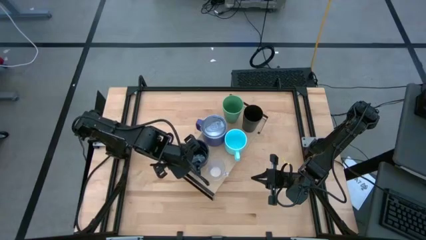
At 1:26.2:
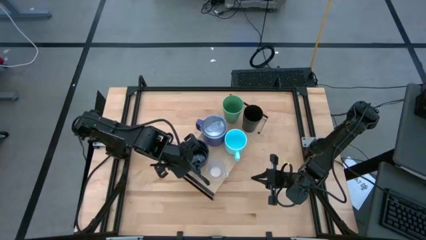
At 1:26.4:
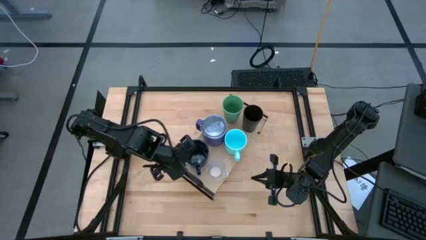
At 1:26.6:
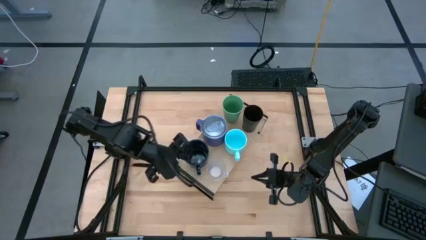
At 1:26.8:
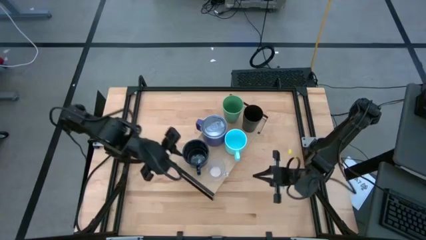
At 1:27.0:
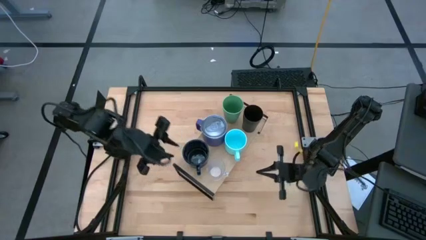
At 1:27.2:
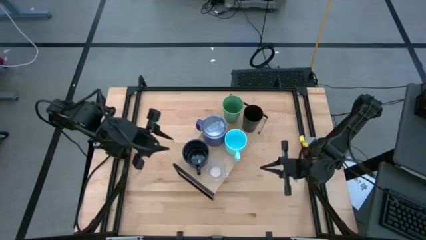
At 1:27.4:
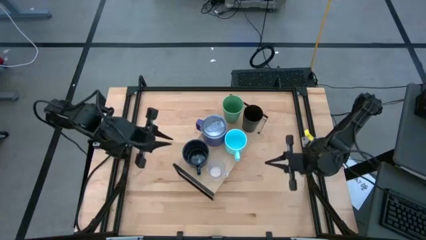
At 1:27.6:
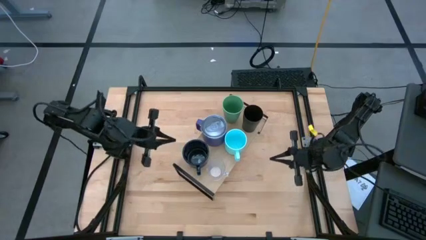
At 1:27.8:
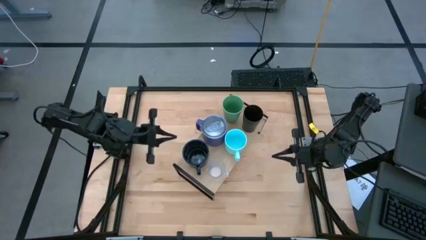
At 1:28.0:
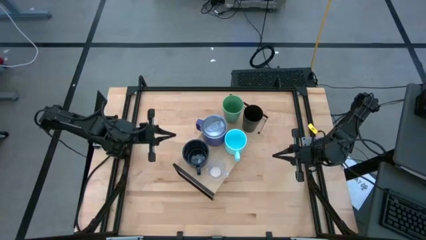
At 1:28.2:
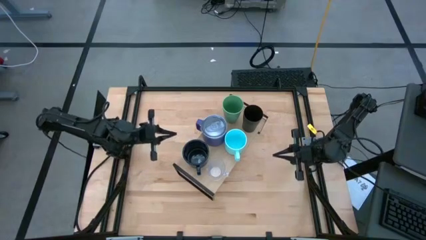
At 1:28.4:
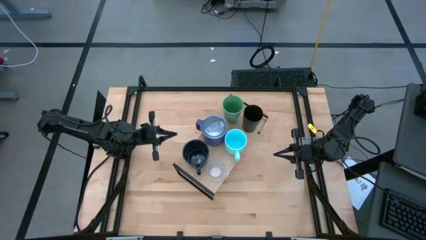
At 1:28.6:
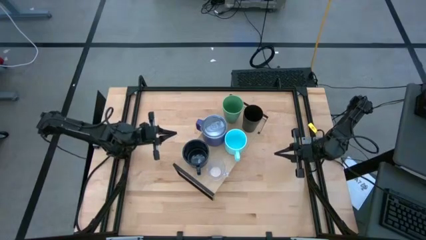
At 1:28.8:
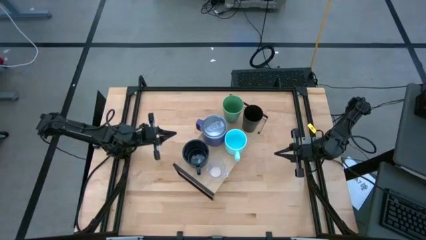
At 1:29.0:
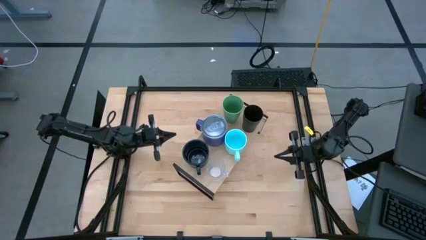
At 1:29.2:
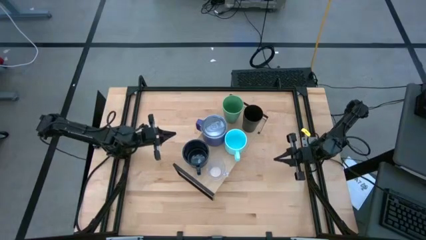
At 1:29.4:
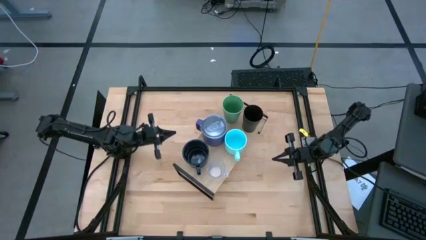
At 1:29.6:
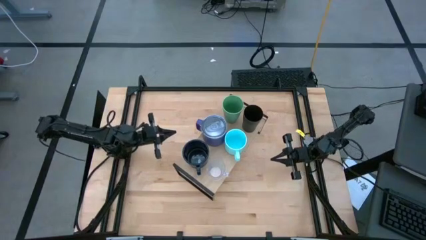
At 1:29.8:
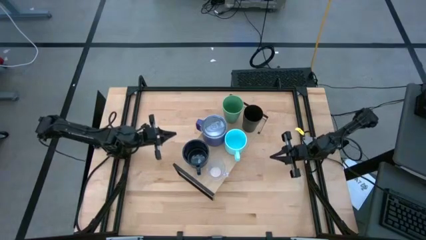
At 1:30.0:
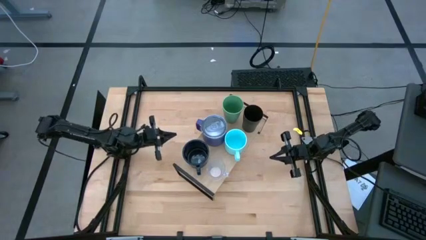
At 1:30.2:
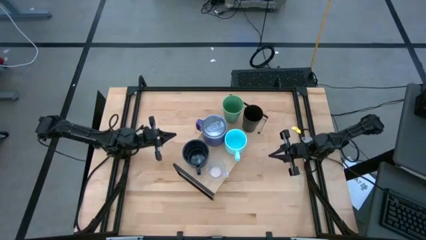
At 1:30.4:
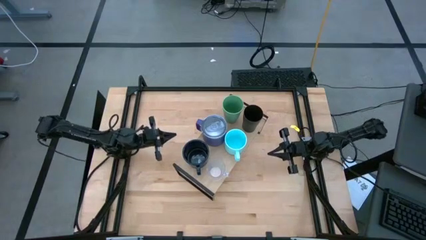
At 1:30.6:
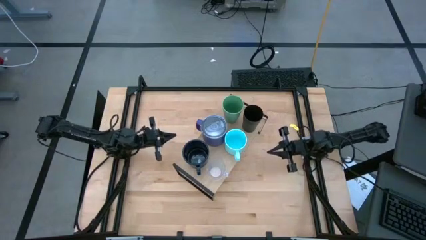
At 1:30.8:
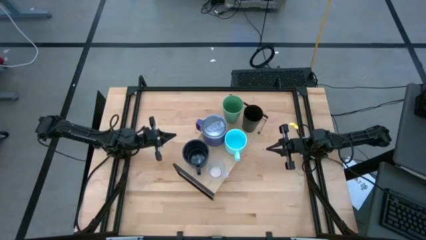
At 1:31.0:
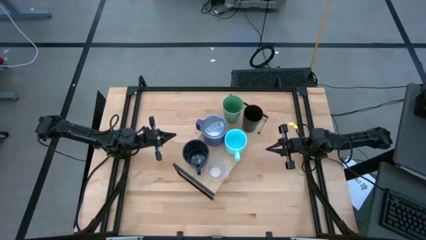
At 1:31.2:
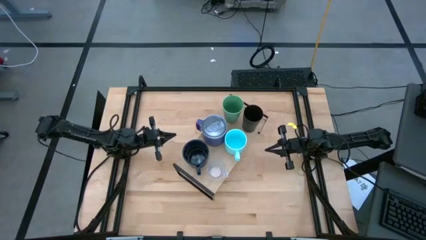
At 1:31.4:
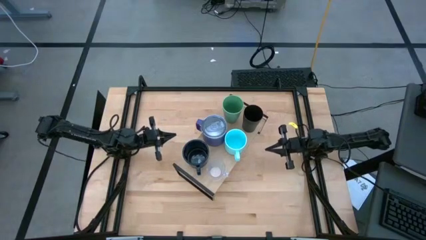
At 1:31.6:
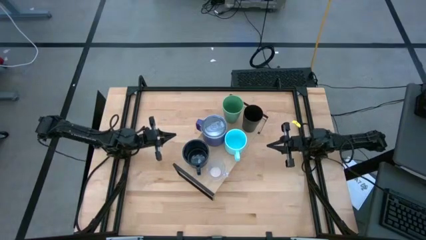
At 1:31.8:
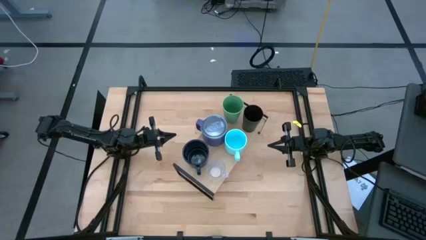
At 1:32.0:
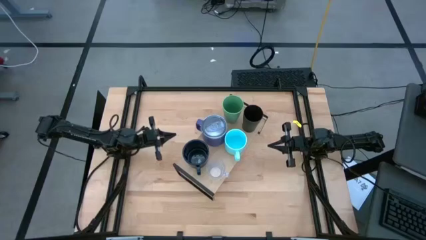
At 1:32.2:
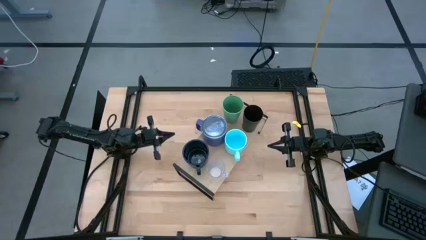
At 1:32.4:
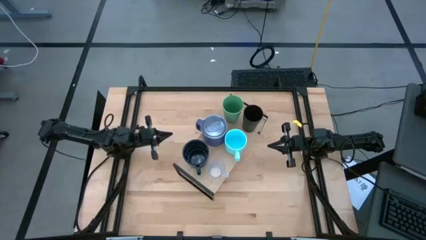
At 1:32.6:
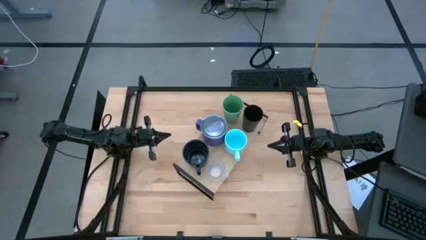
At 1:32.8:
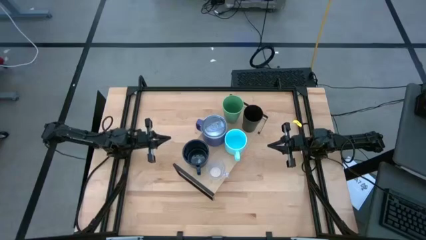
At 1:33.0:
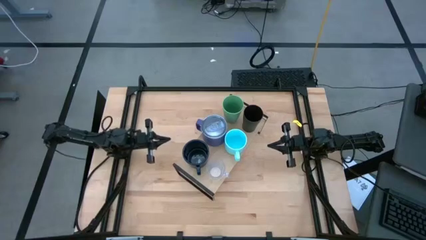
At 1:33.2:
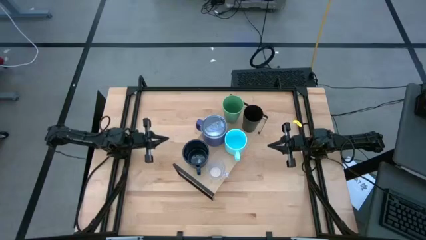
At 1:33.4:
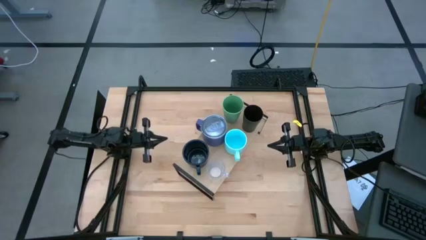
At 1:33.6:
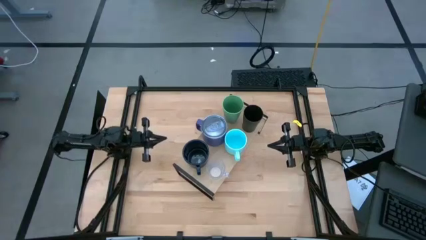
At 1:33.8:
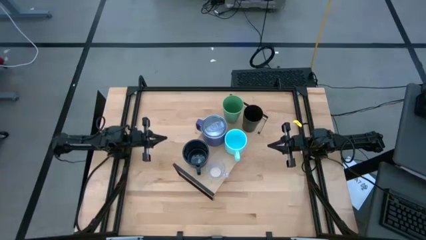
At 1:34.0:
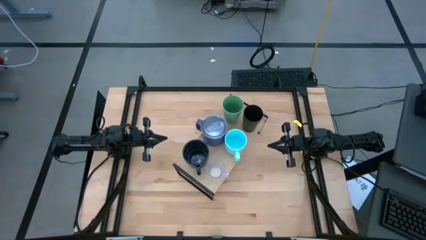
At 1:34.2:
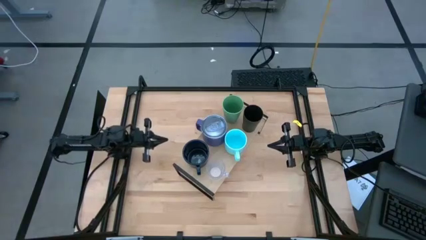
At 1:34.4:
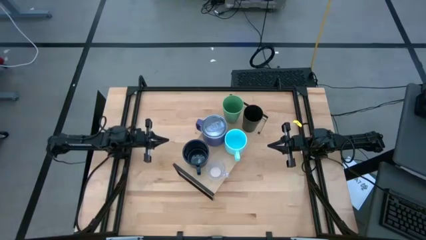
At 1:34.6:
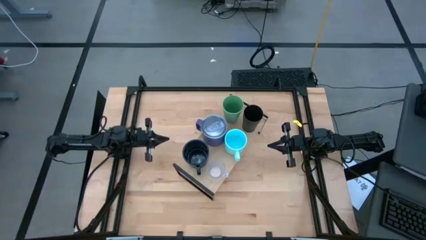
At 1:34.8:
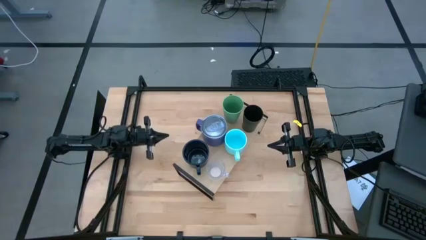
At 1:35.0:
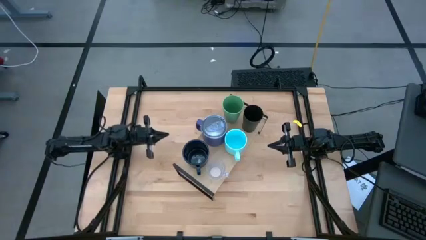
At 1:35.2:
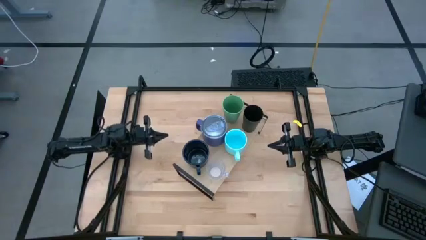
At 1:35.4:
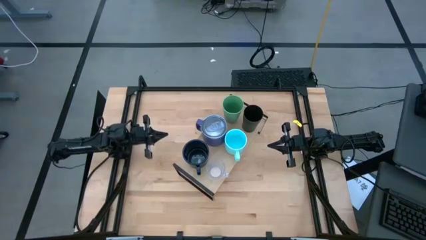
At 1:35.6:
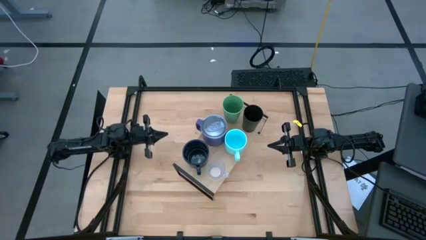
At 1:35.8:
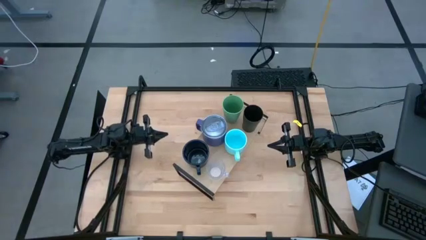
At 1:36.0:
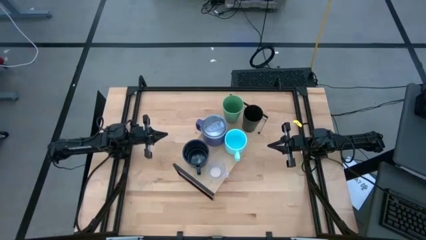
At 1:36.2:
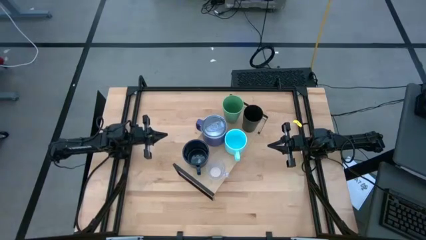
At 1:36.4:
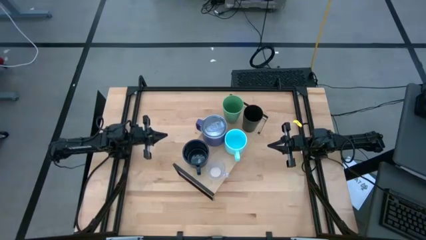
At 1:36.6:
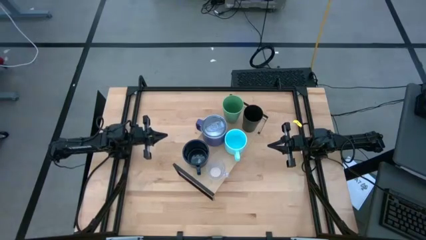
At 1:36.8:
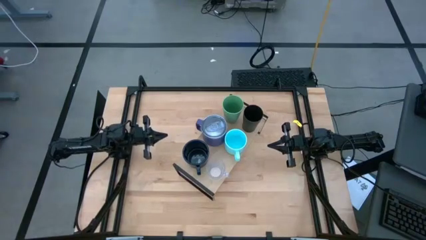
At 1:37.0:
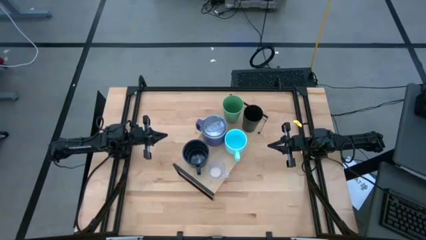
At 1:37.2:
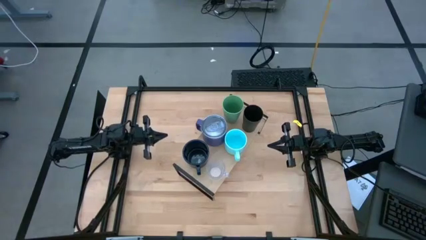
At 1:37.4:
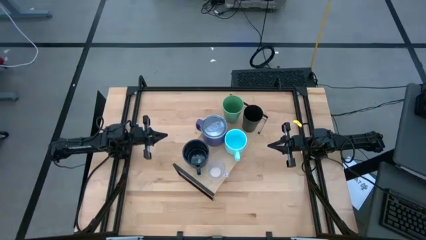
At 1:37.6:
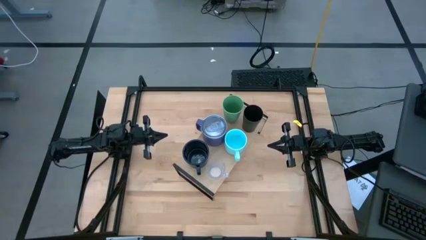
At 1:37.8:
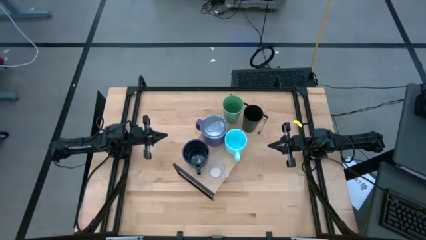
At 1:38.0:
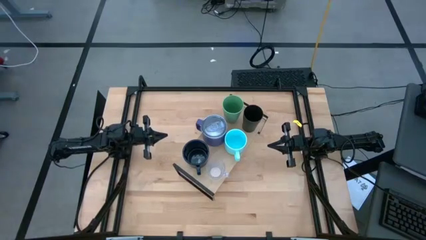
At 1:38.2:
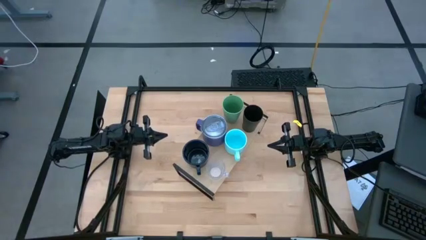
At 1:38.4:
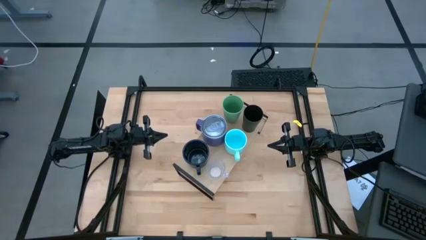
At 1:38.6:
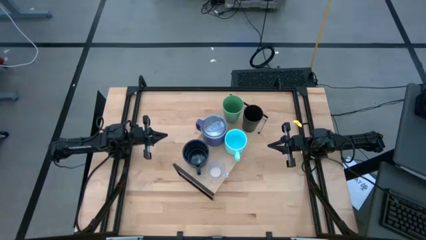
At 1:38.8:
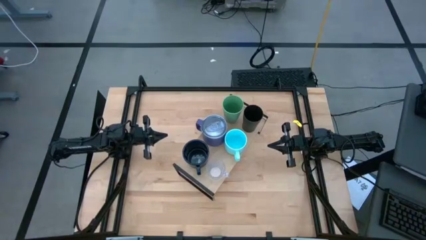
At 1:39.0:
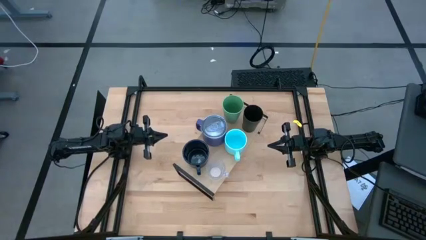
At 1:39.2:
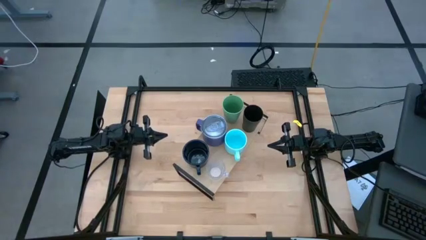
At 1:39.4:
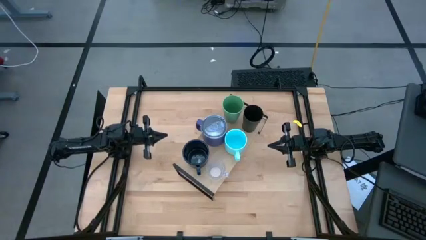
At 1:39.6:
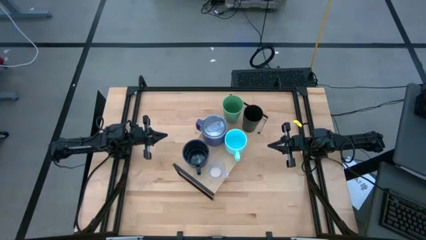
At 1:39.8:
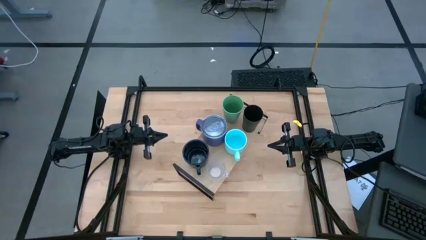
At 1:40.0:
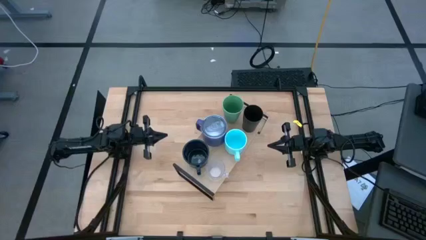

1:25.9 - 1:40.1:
Task: Stack small to large cups/mugs on shelf
Return to Home Position
